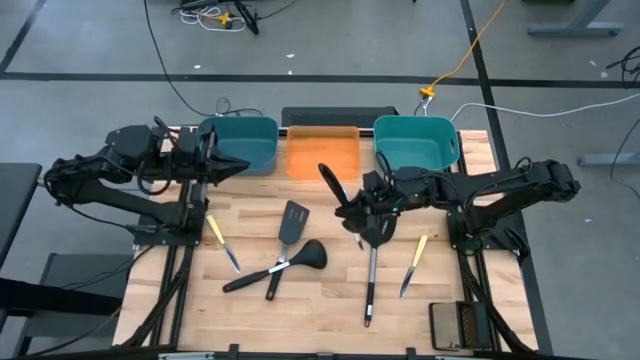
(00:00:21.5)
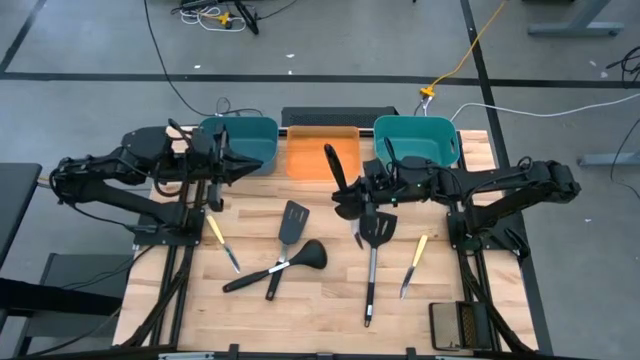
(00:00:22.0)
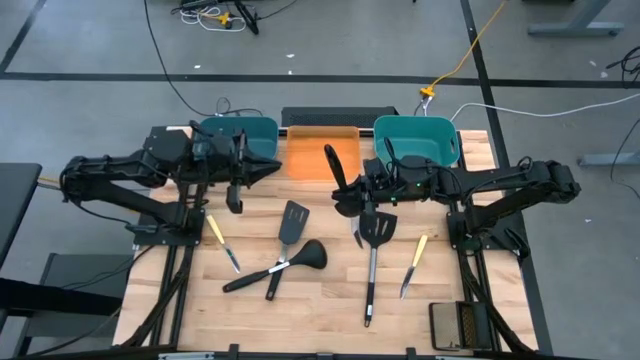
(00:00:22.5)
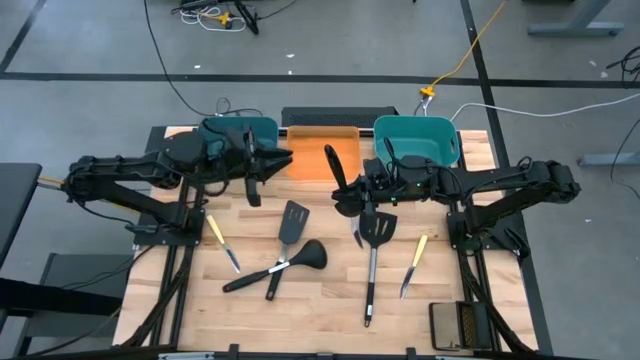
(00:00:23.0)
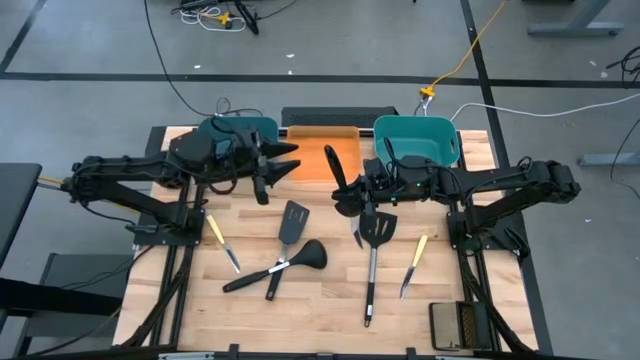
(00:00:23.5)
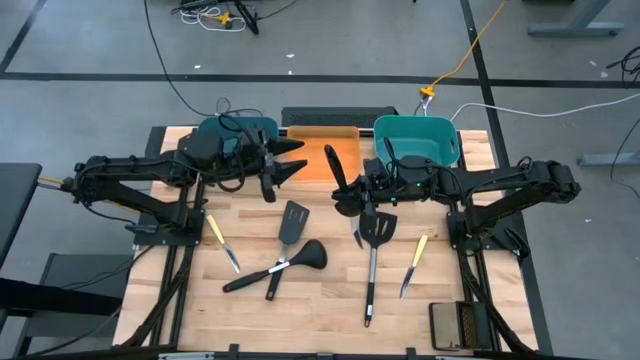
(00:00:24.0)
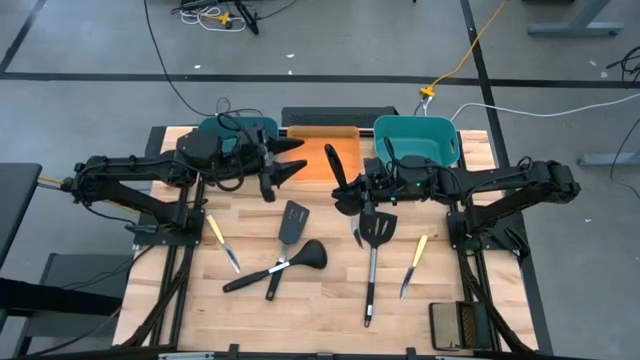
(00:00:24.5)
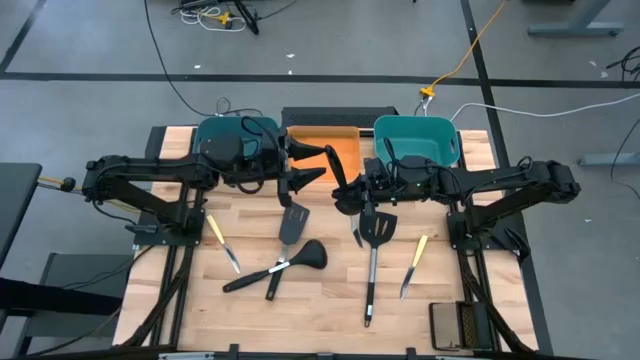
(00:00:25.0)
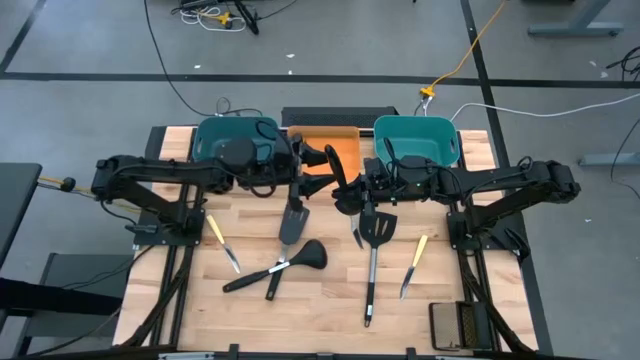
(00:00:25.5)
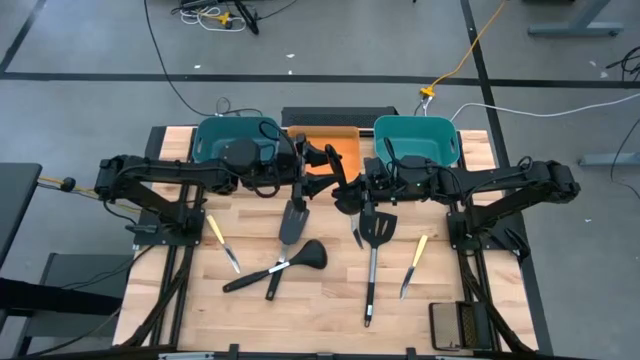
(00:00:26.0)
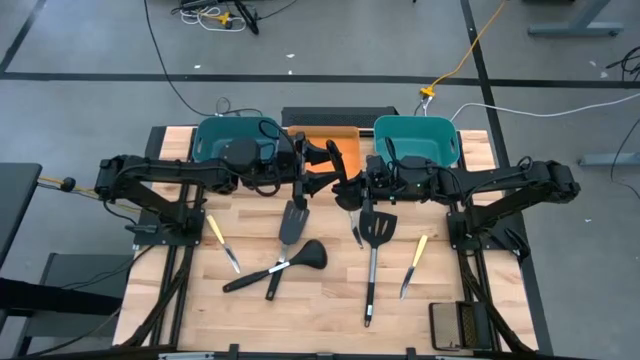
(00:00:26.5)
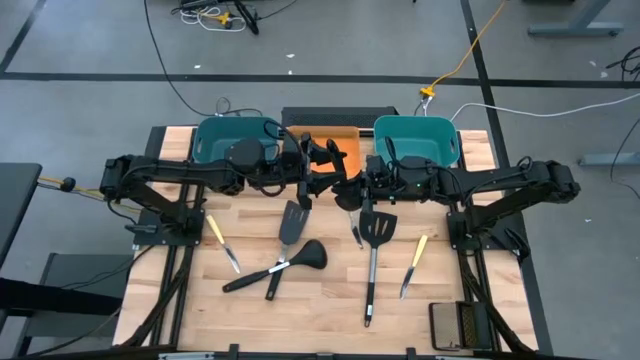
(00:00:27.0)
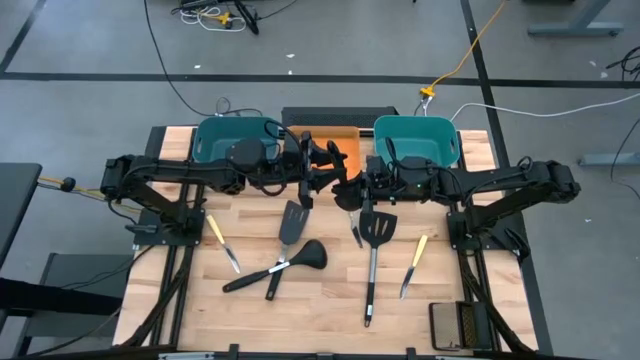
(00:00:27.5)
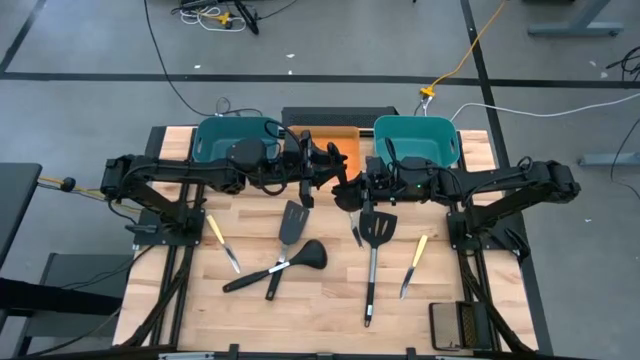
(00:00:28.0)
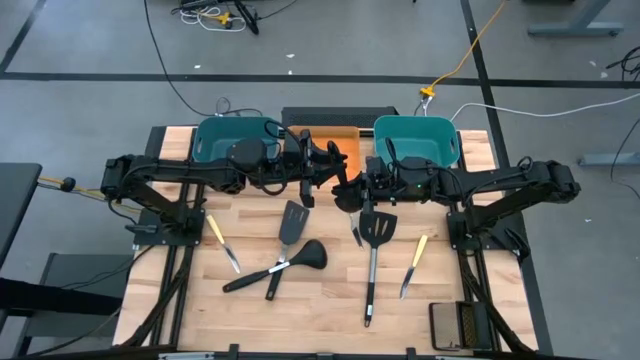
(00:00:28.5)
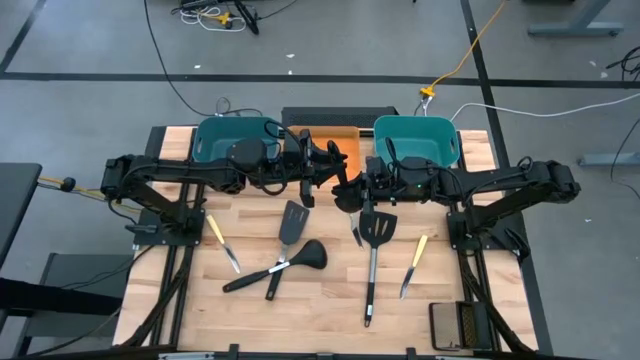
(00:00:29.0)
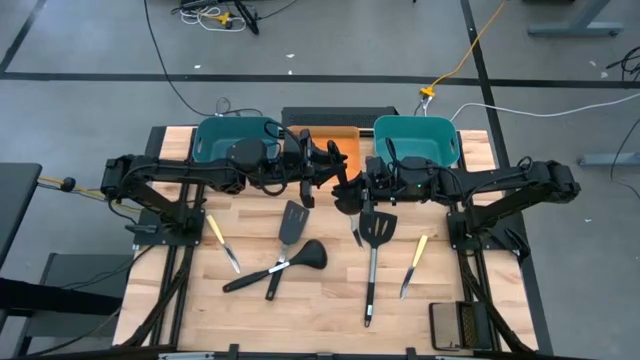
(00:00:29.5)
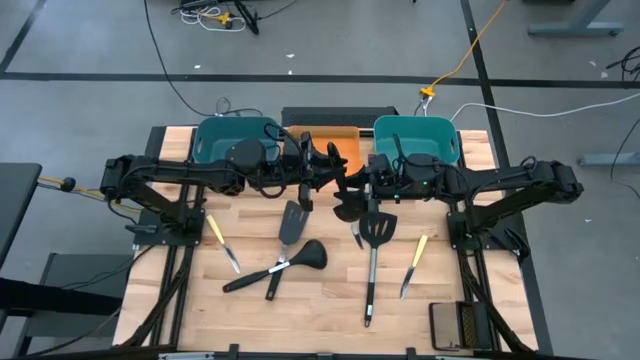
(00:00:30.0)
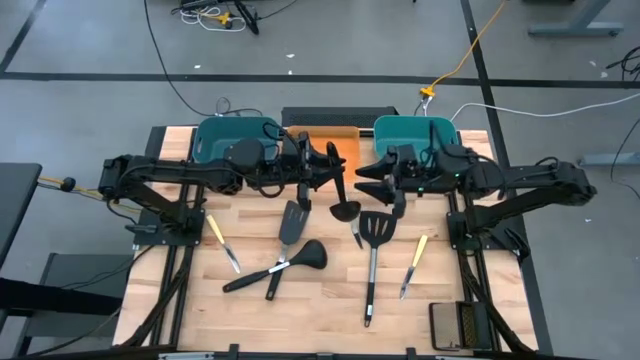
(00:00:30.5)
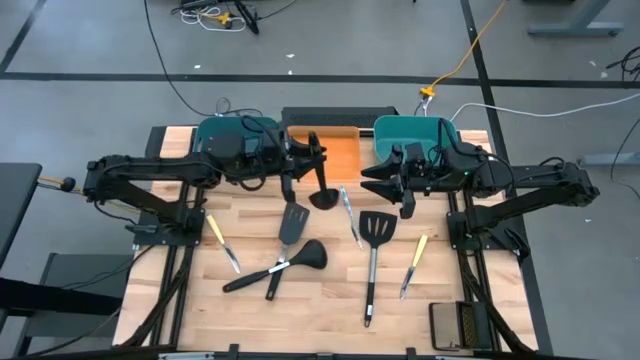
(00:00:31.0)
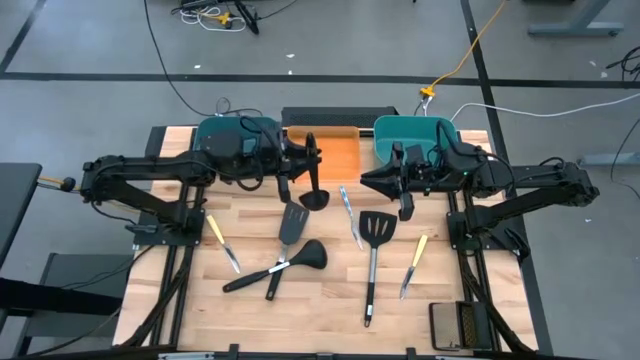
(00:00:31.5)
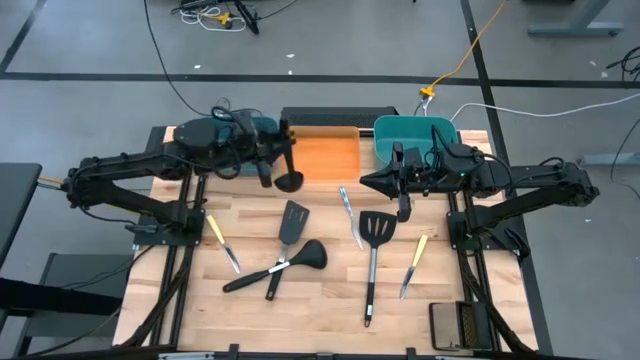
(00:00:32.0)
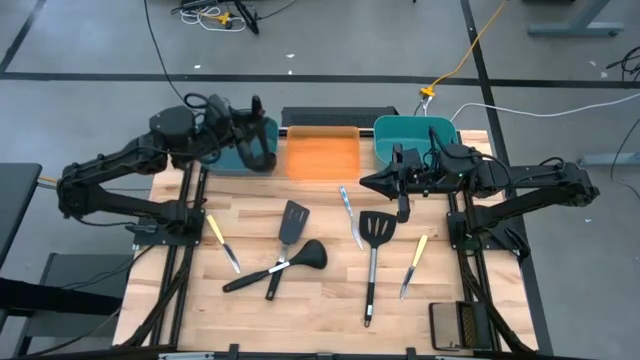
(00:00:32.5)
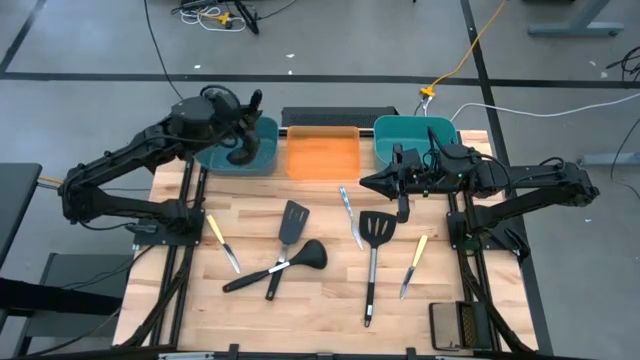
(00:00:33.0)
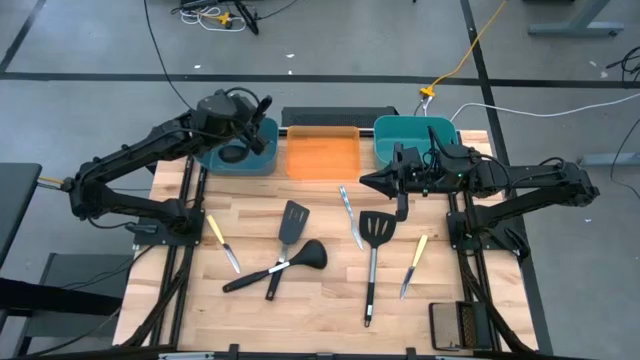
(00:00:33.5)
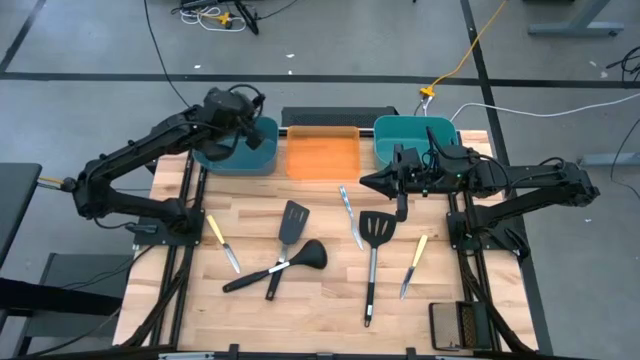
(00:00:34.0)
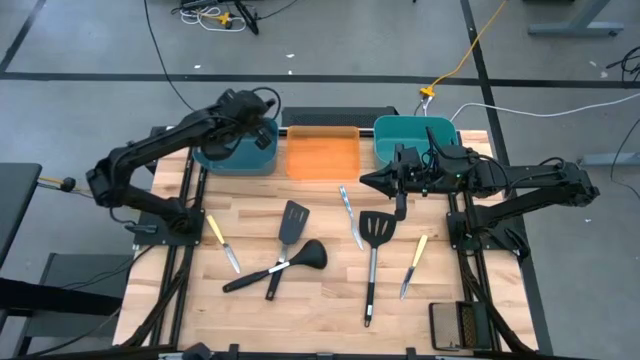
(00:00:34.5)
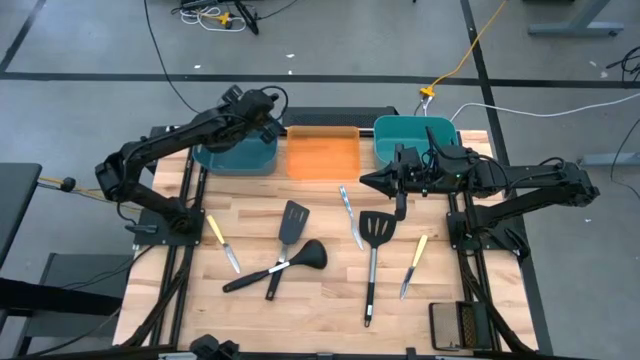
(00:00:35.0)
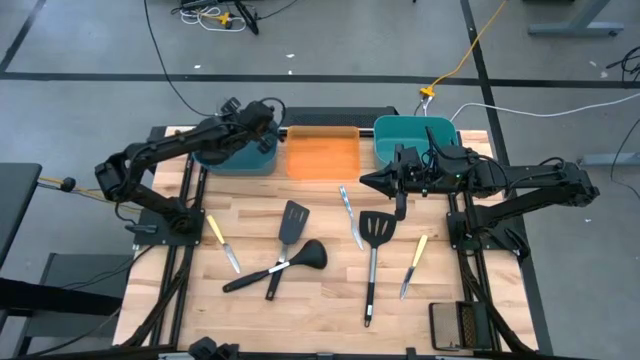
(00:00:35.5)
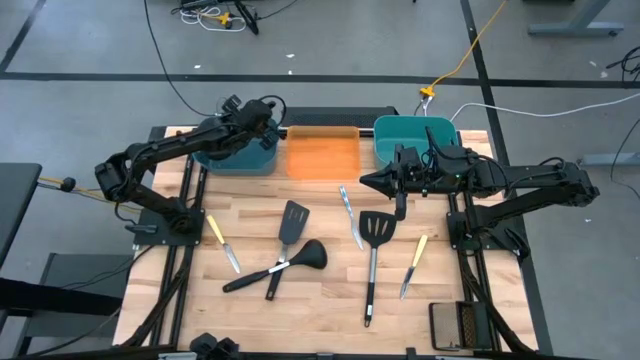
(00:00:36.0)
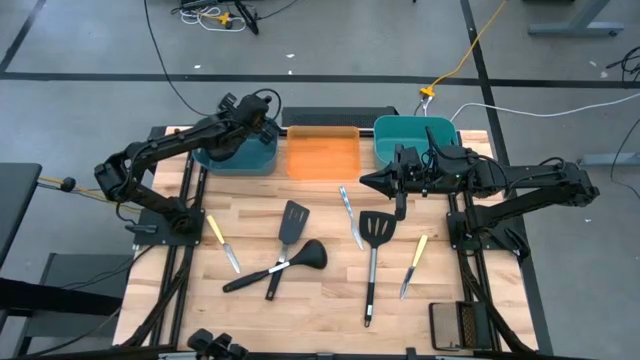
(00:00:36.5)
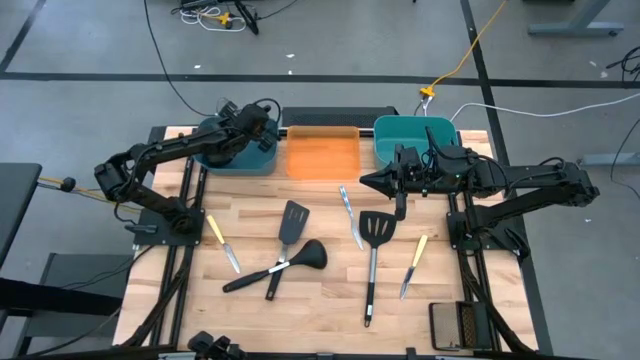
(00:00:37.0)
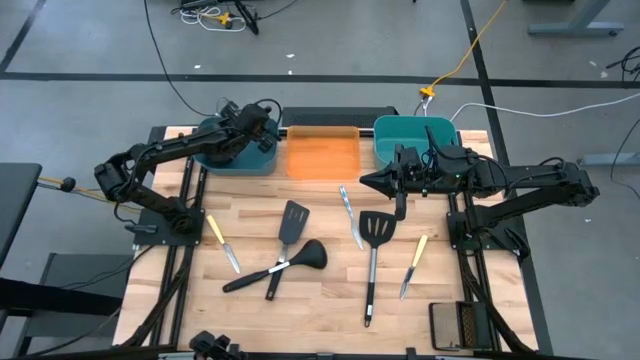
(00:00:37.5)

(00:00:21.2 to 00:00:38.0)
Task: Pick & Place Kitchen Items
Put the black ladle into the blue bin
